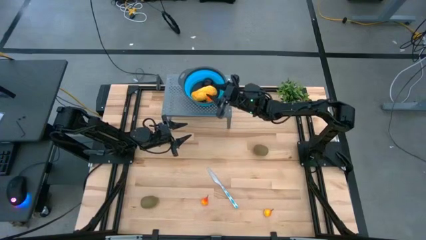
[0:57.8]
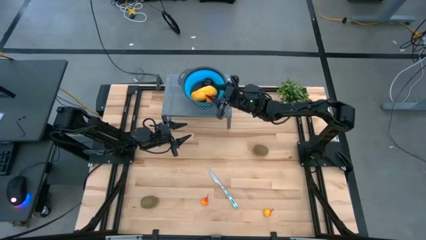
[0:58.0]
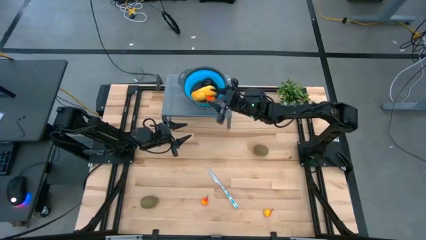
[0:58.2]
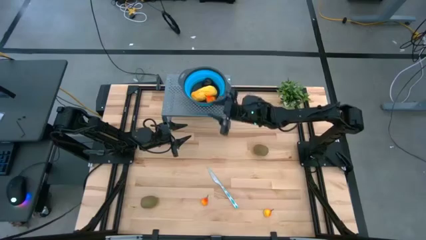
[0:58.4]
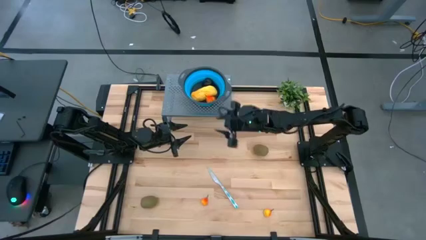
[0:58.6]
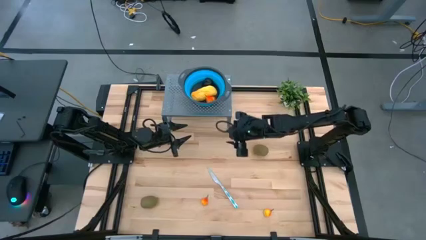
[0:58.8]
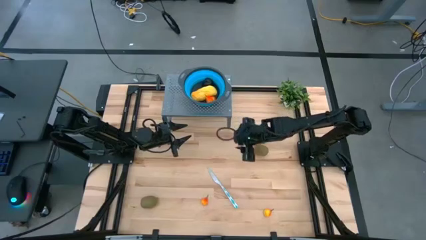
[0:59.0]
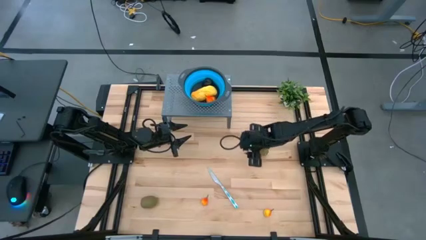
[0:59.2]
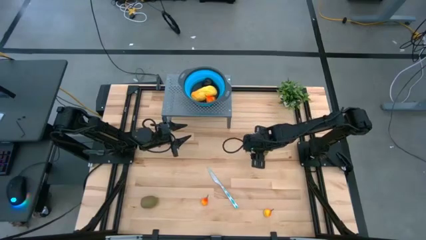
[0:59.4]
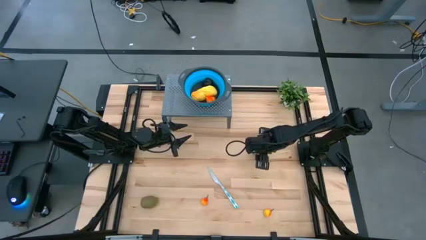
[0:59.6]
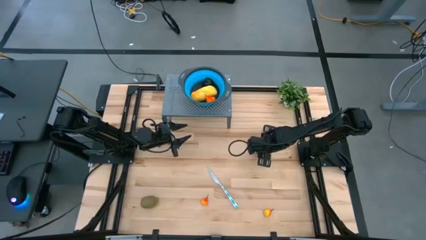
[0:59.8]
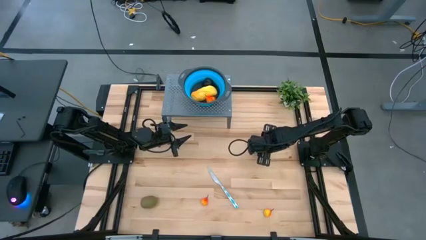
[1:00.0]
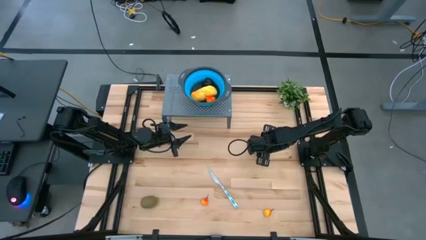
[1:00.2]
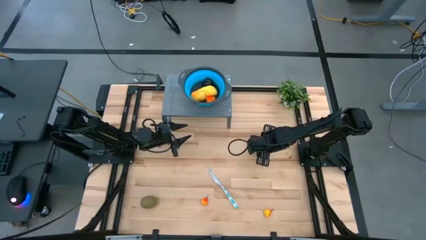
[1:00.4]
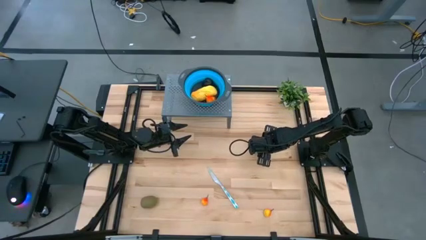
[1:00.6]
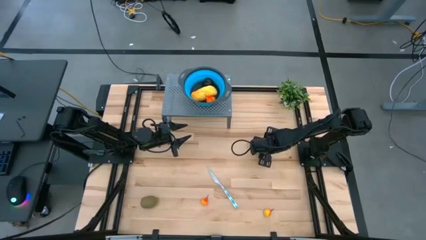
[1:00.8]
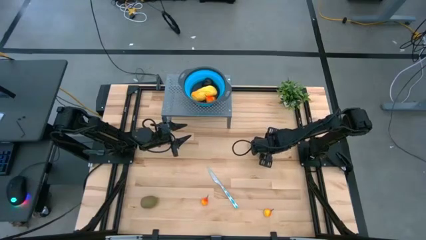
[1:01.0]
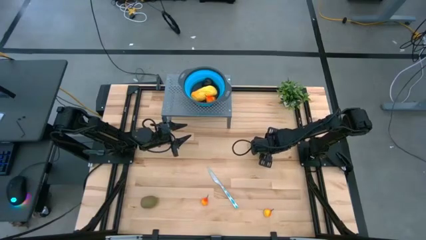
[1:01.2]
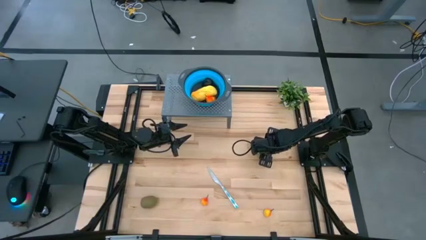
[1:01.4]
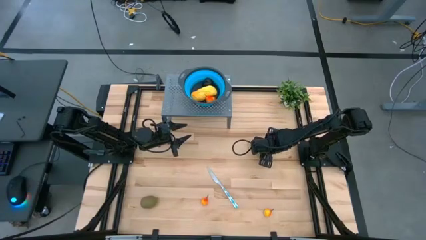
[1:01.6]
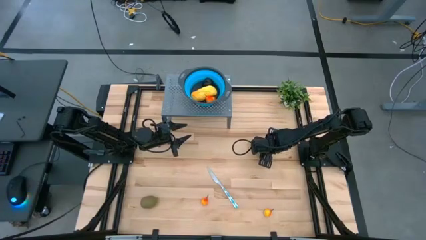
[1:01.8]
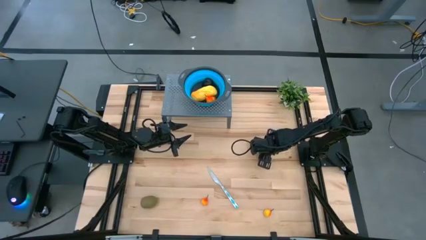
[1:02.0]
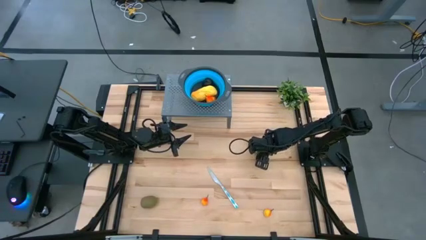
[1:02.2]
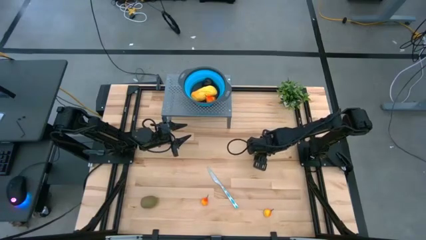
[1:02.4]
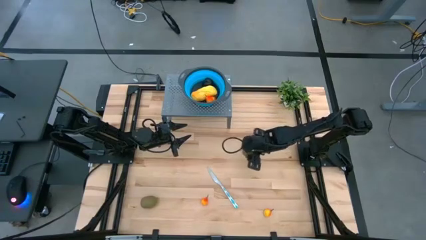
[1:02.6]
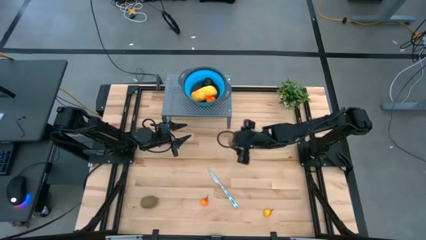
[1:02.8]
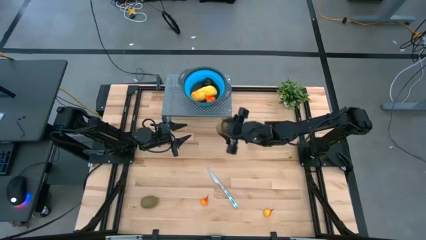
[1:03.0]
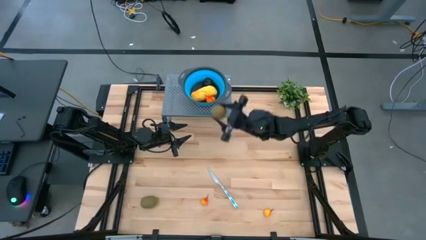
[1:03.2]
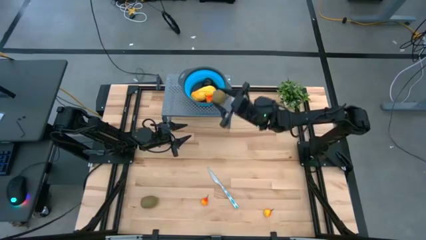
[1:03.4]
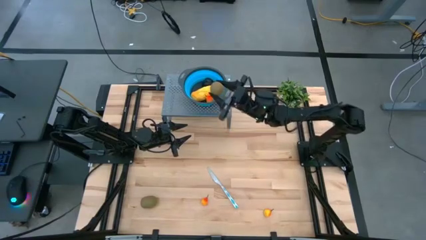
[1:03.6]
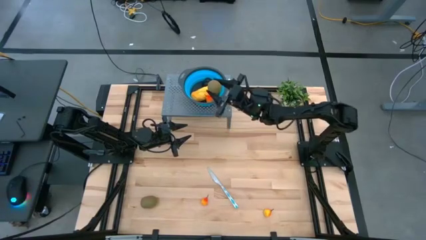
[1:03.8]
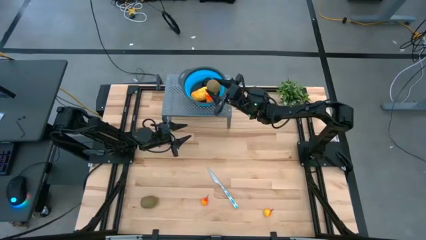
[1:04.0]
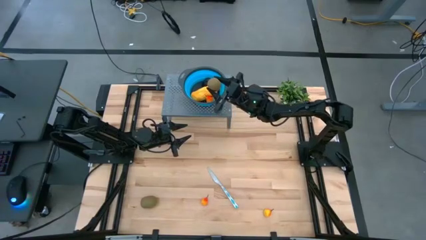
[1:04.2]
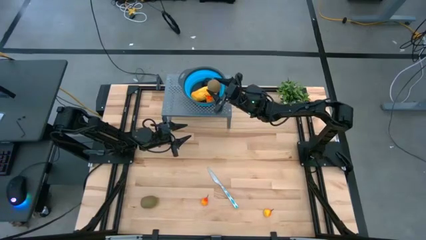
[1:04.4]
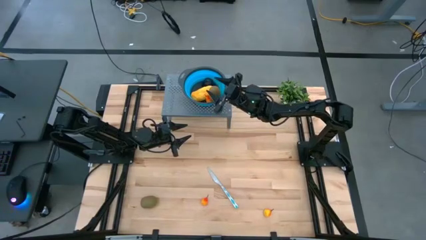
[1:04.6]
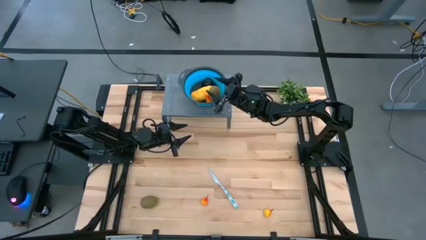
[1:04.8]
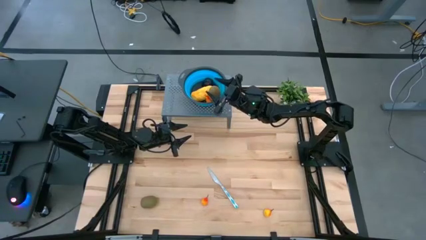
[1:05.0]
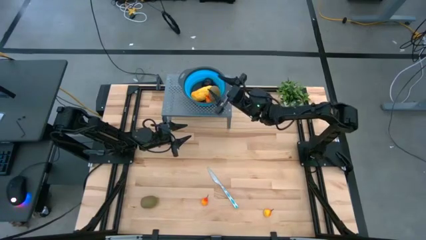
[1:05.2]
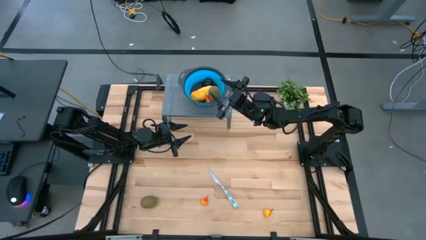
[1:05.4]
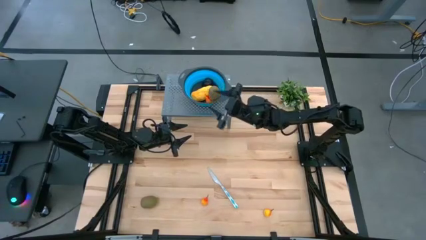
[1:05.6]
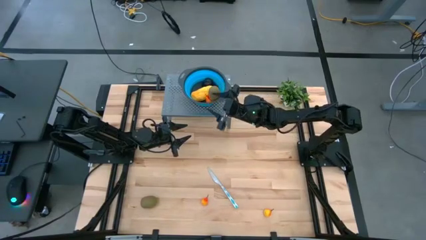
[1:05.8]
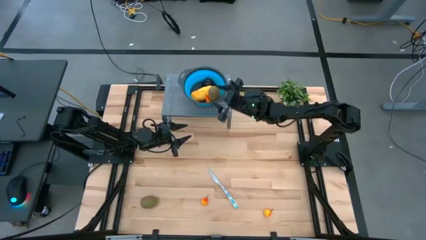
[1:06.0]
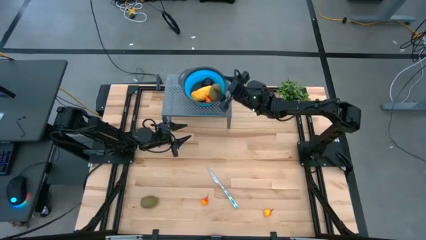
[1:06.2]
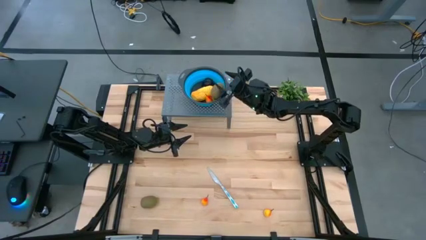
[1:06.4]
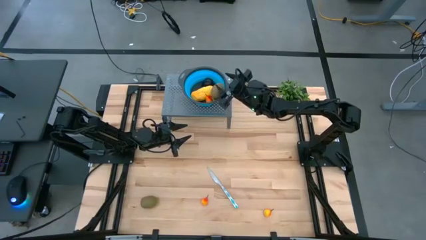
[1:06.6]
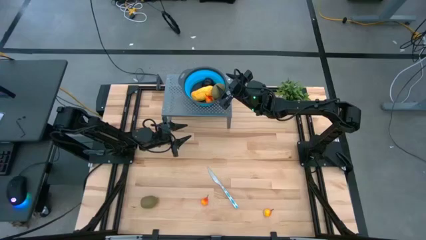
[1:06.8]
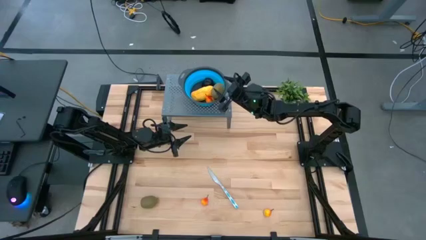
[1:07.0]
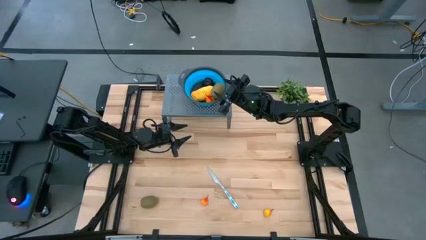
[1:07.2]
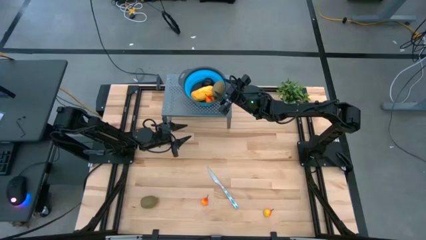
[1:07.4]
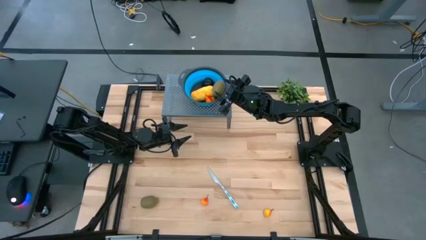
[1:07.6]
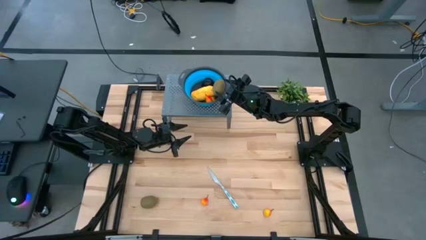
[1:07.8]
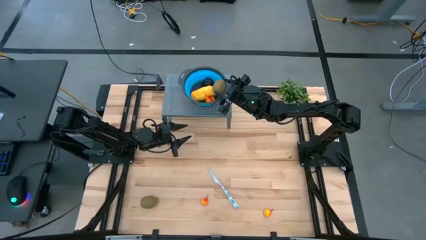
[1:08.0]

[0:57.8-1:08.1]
Task: Pick & Place Fruit
Put the brown kiwi into the blue strainer bowl on the shelf

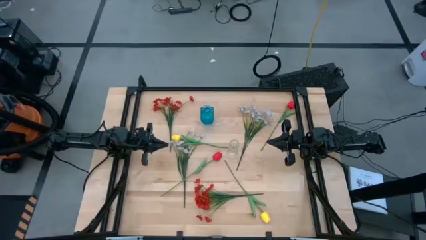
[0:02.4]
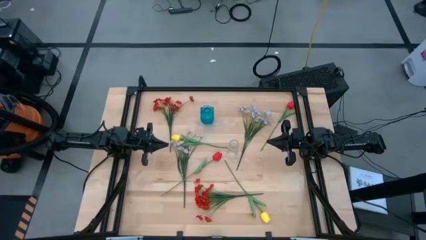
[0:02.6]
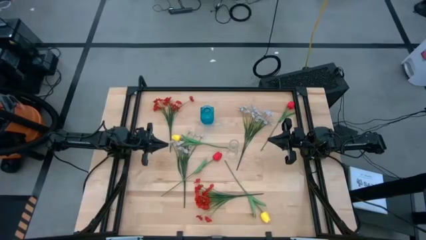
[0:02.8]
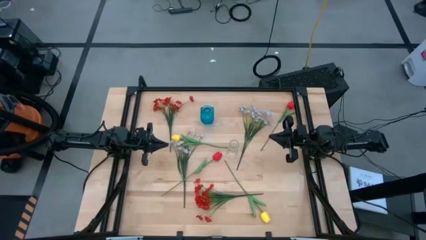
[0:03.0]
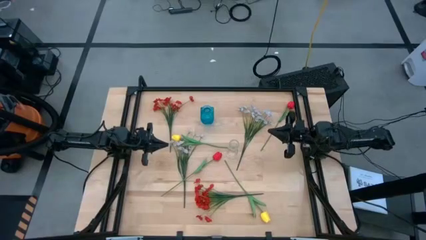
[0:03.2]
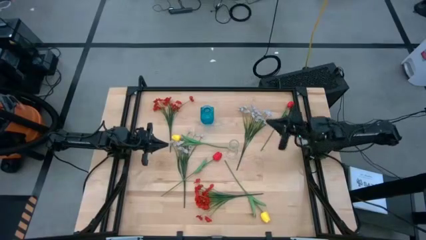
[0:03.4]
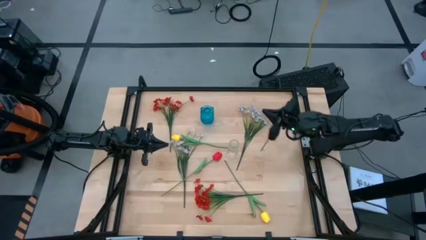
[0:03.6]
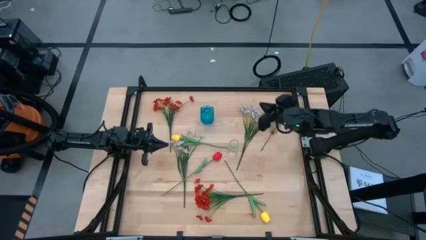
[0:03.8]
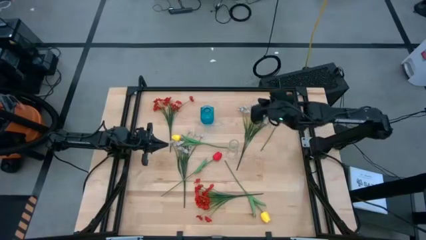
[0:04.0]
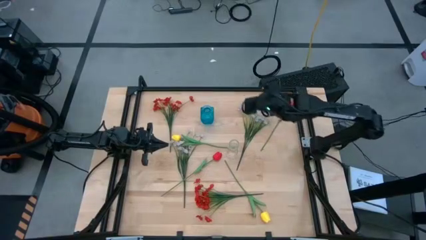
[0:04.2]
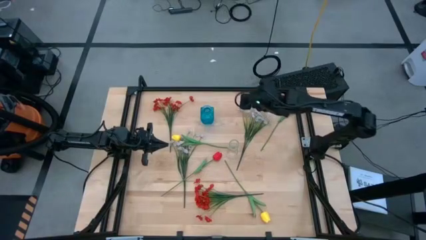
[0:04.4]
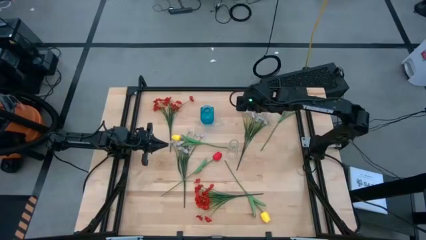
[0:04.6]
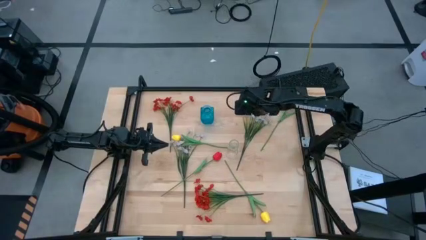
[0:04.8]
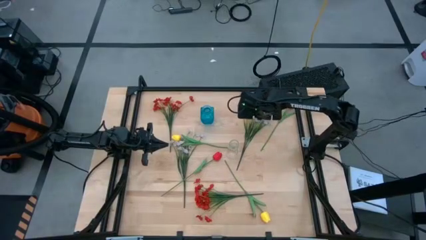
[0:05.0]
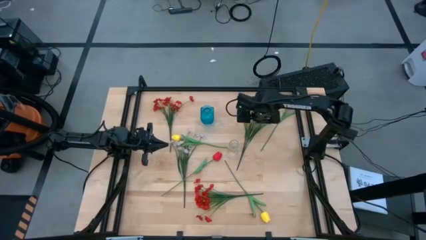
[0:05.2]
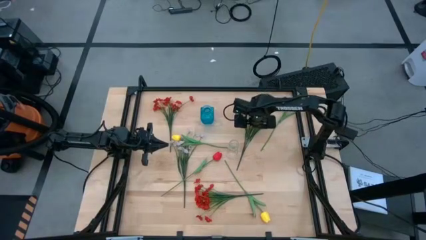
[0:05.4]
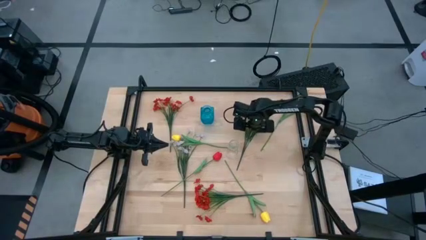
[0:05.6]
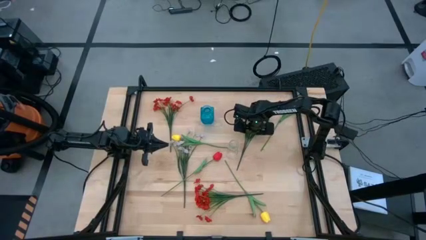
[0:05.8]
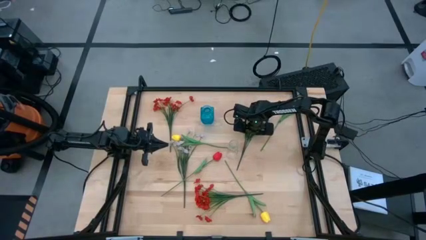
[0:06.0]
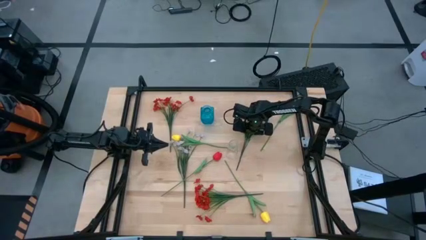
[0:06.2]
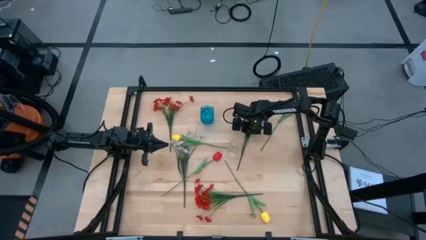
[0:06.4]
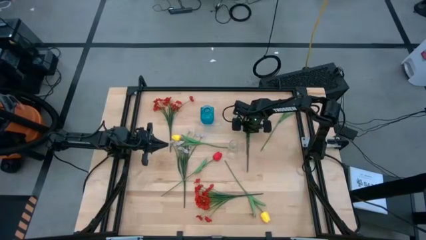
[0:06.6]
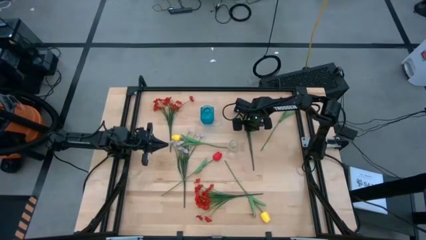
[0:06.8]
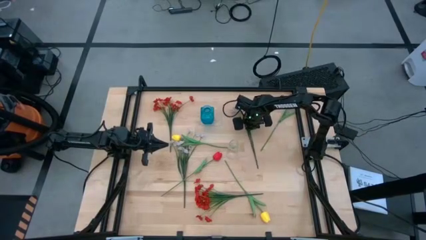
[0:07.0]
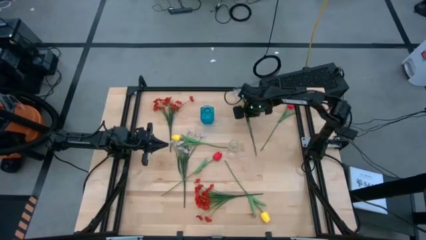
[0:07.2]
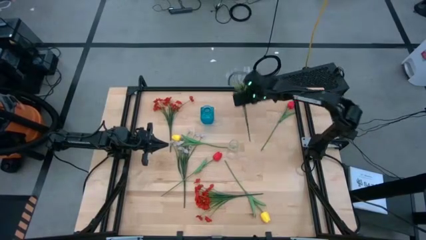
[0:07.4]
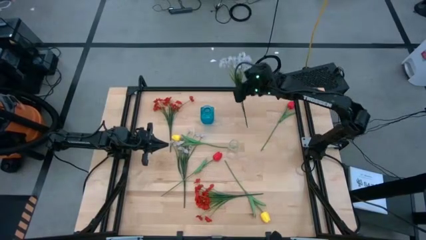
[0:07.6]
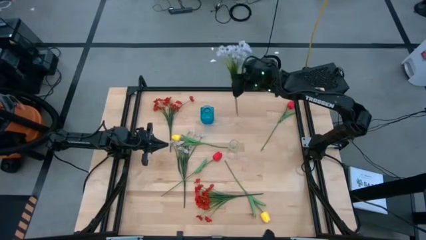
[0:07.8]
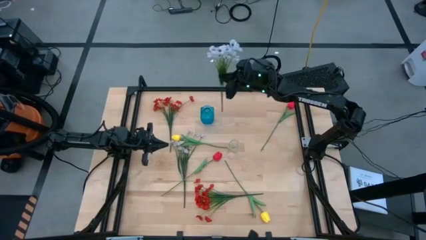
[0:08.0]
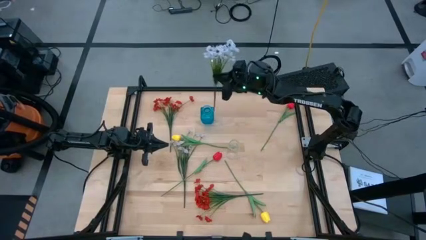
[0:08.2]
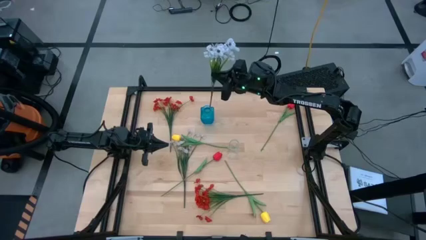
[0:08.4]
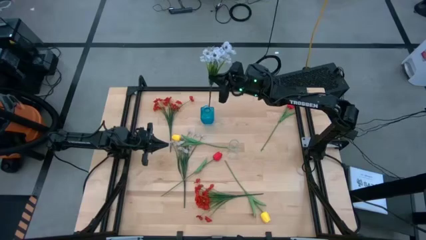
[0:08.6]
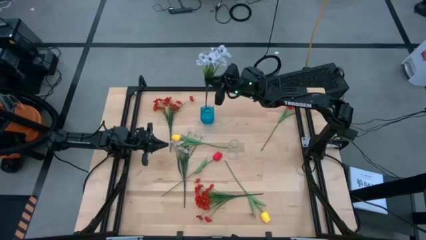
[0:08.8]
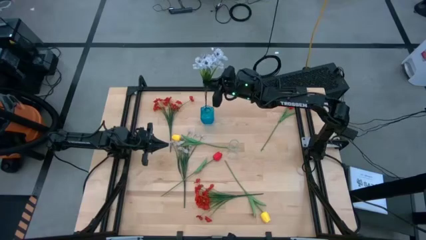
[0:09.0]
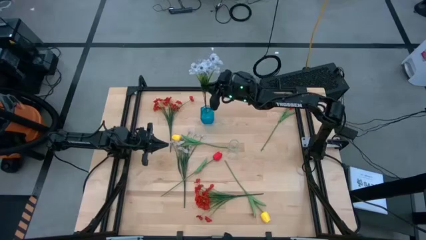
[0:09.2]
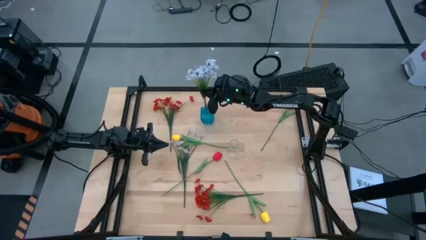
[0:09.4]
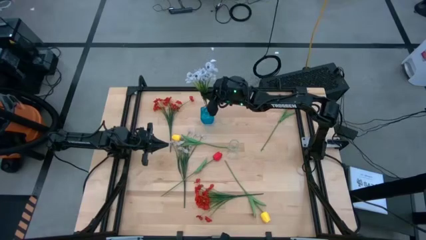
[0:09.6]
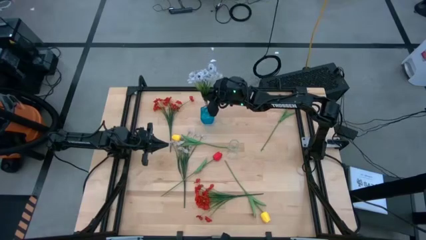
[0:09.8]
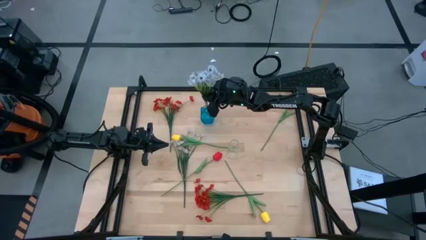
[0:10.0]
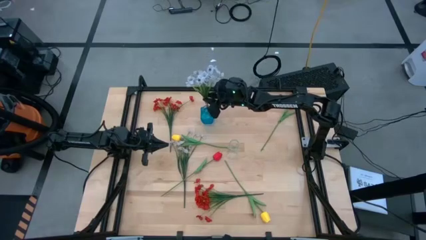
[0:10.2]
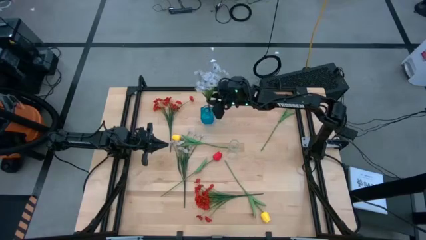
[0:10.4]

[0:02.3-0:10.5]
Task: Sort flowers into vase by color
Put the right white flowers into the blue vase
